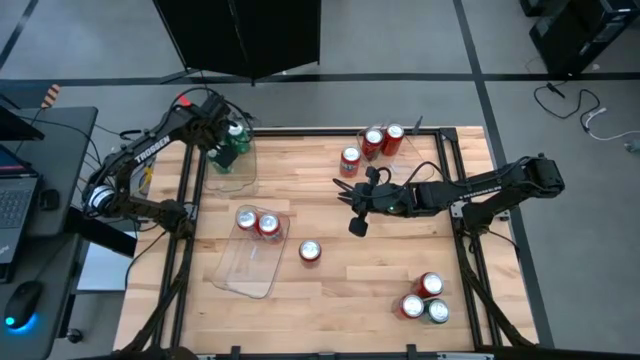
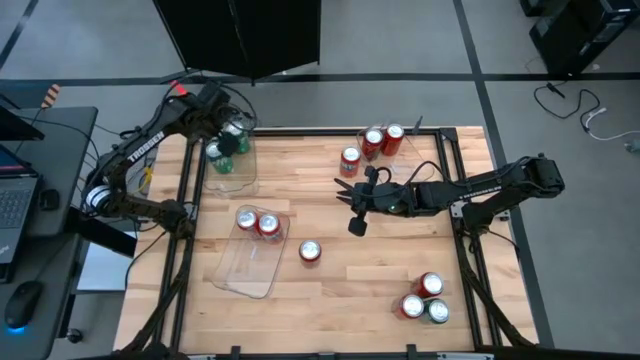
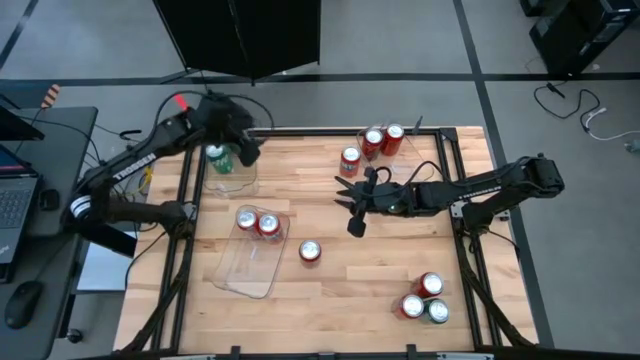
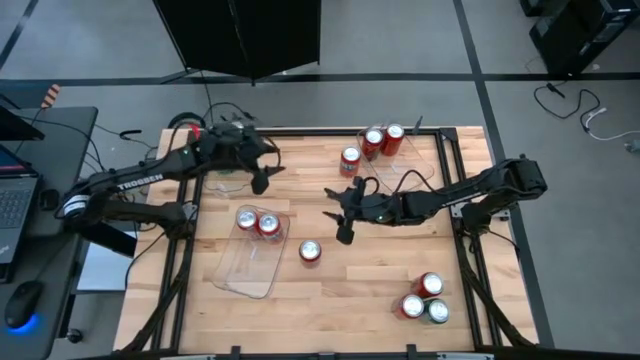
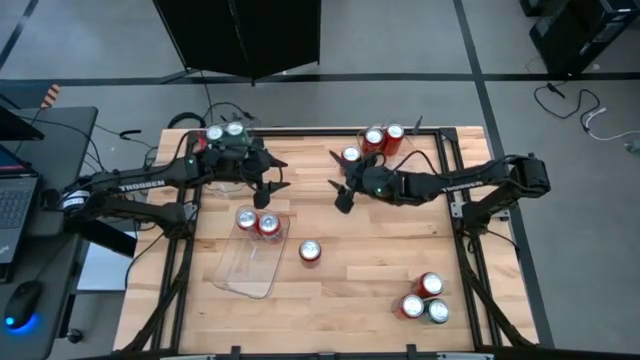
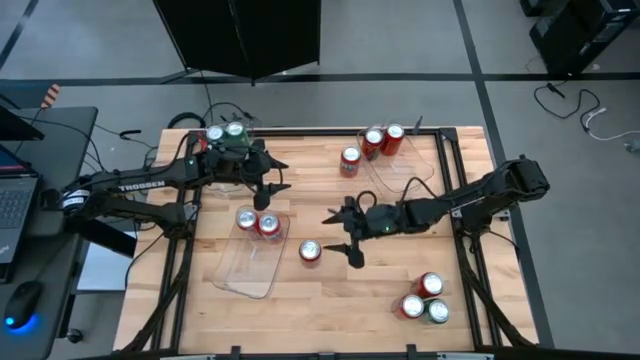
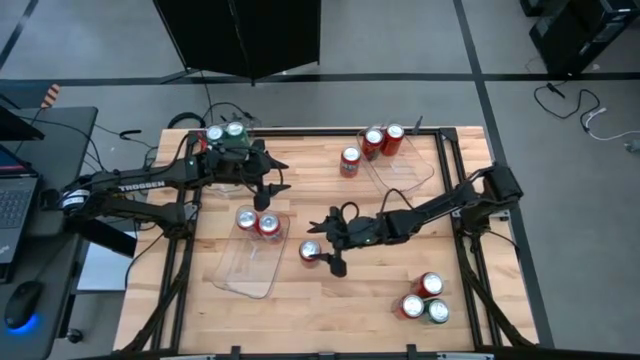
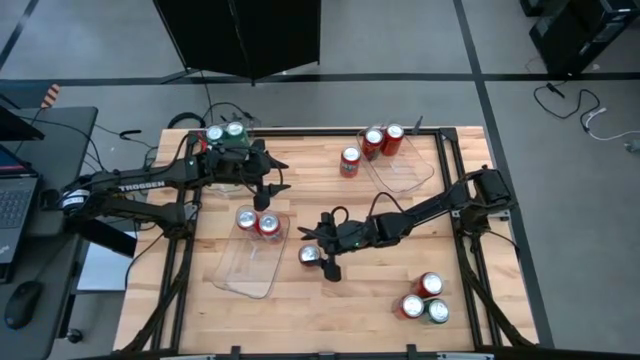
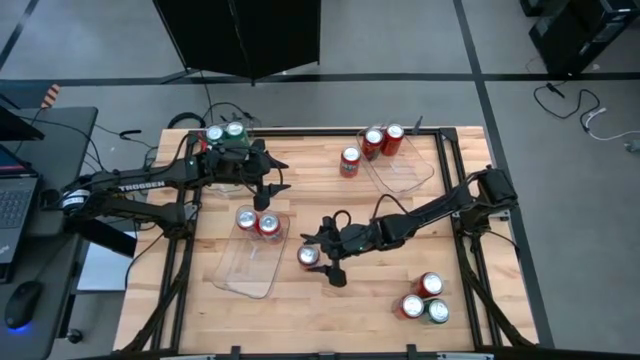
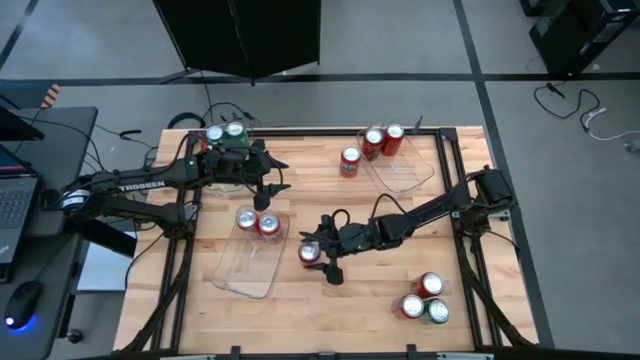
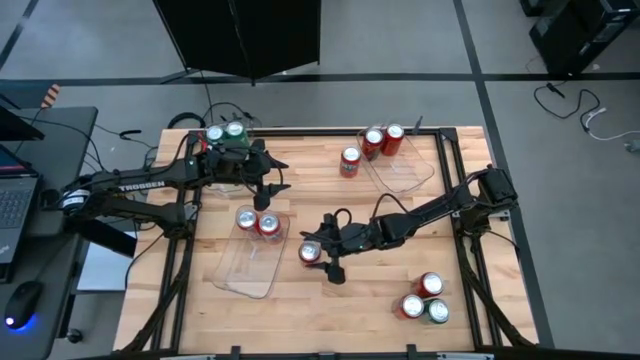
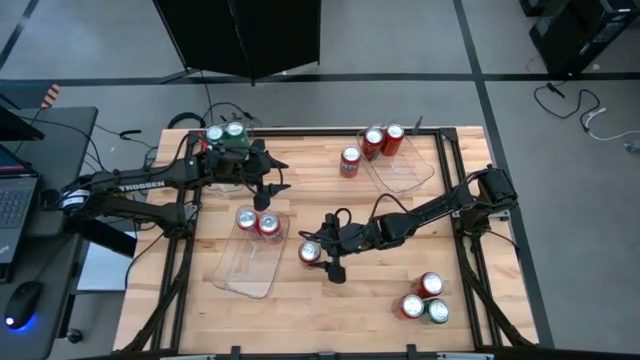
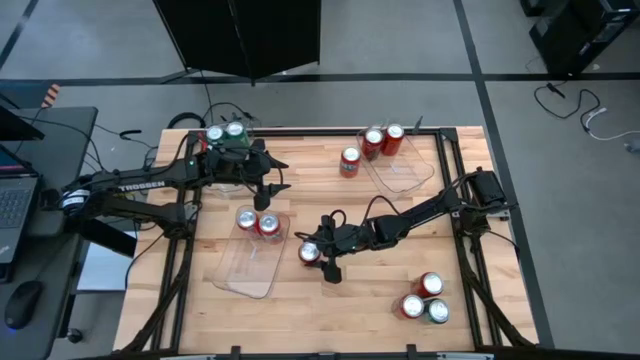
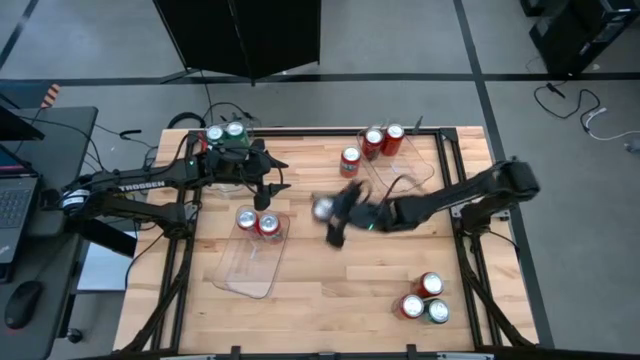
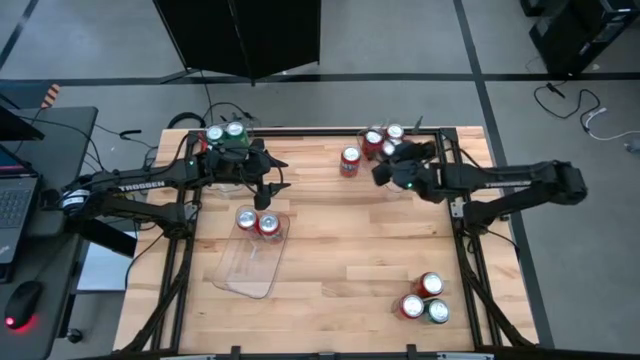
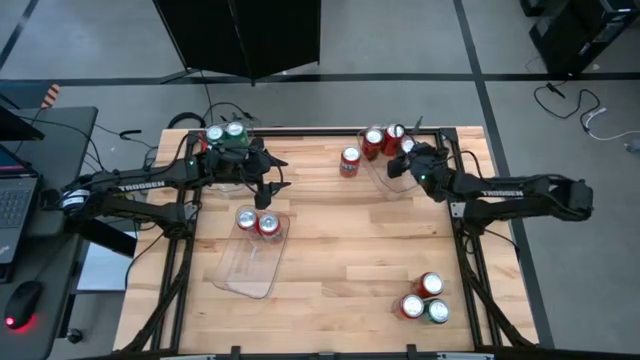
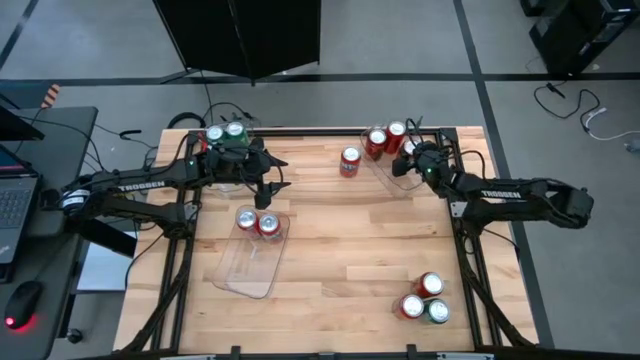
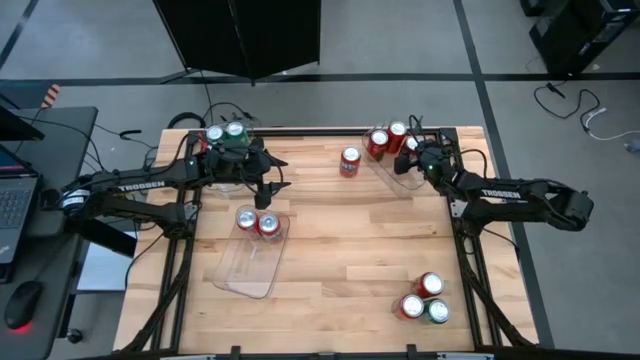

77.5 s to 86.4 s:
Task: Sort soda cans
Put the left red and black soda can into the top right transparent bin

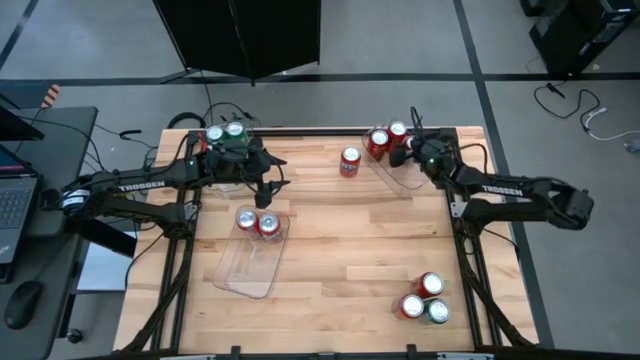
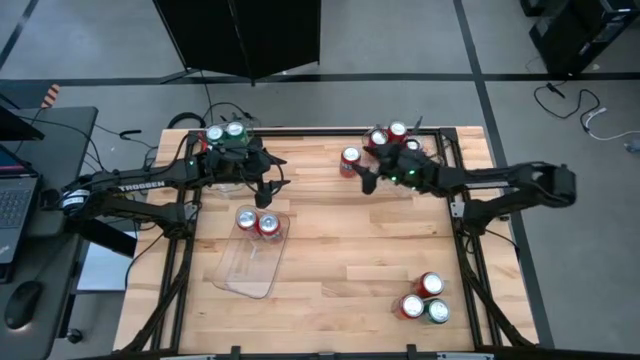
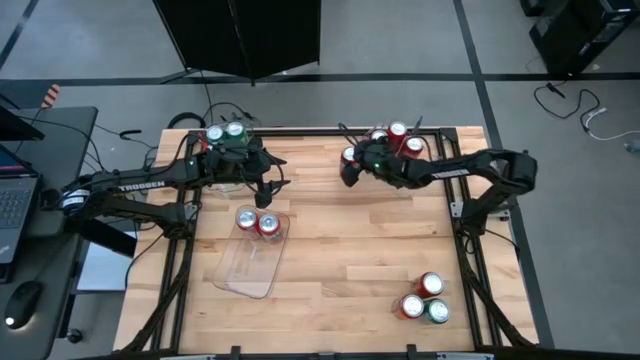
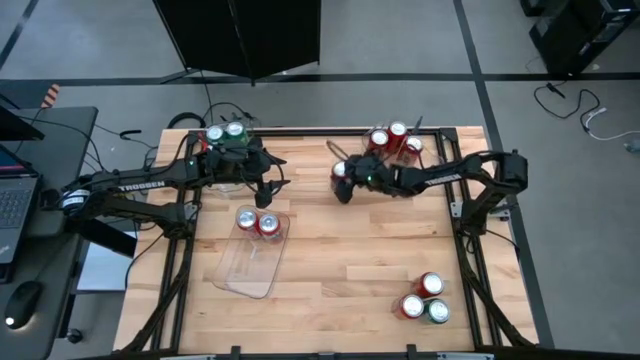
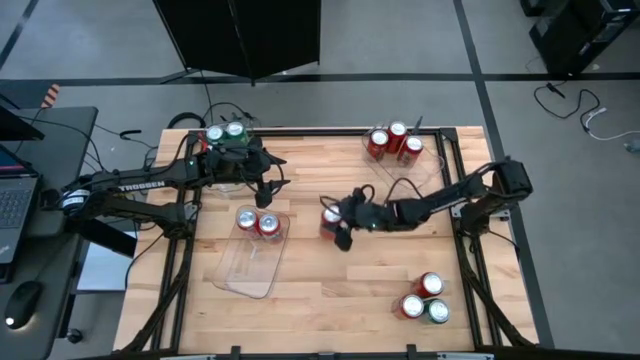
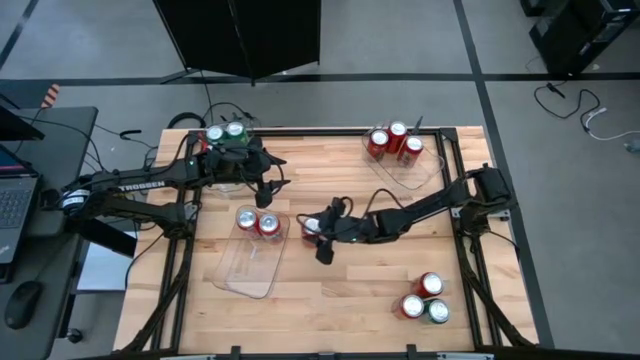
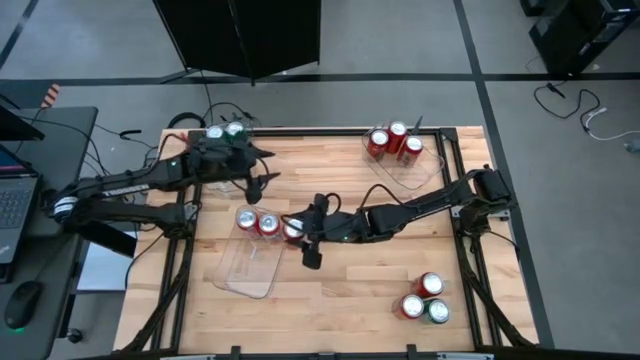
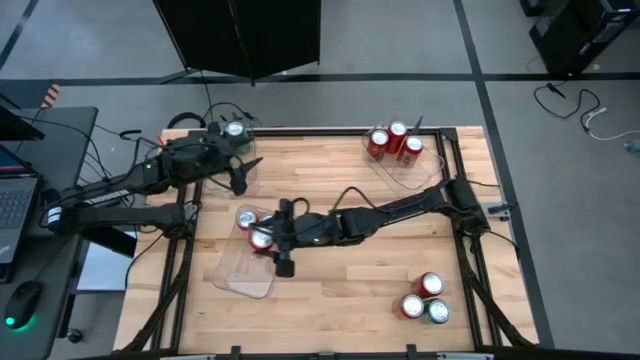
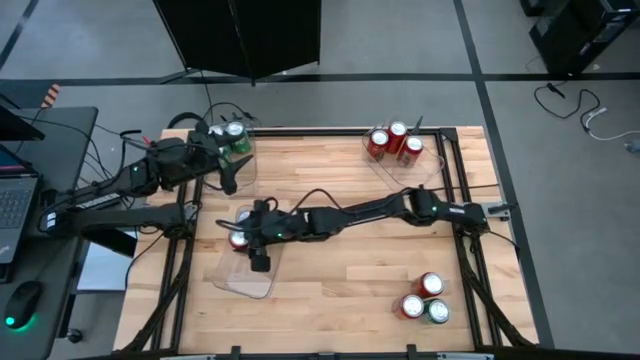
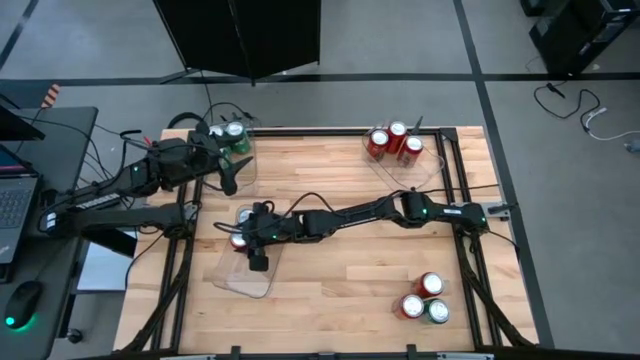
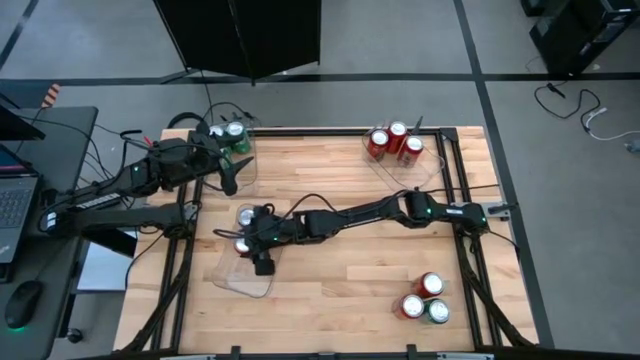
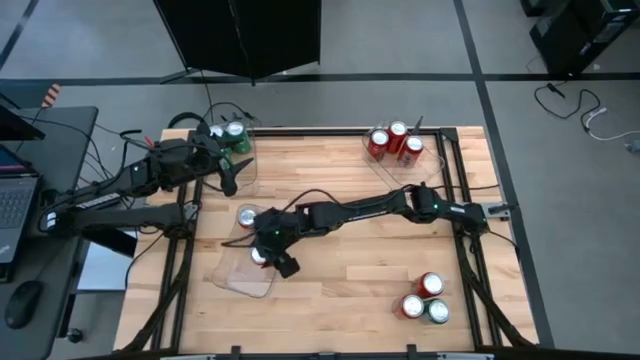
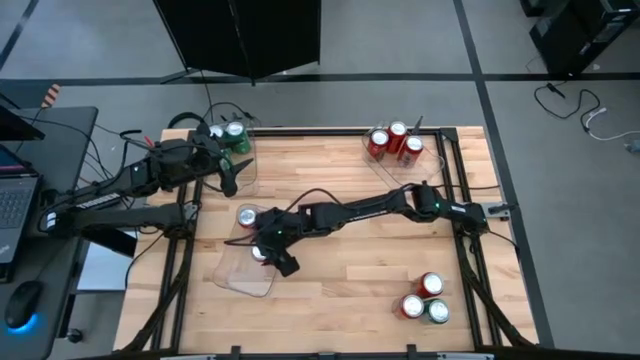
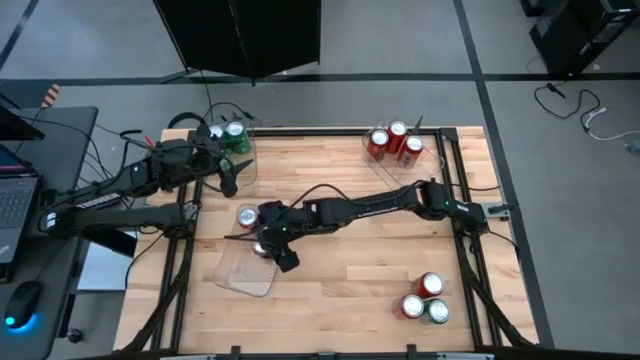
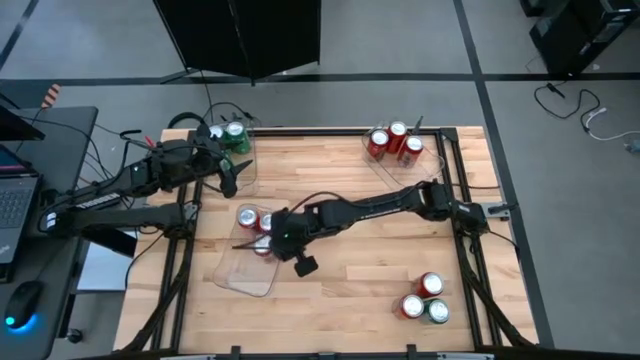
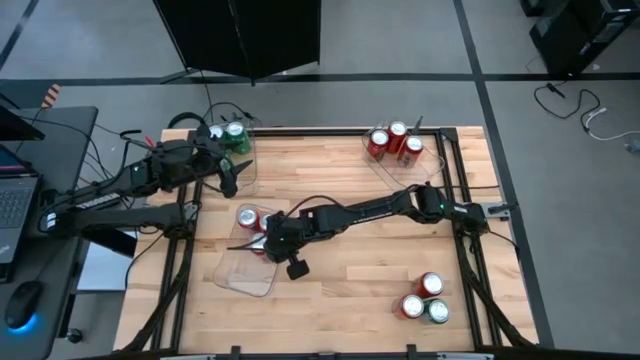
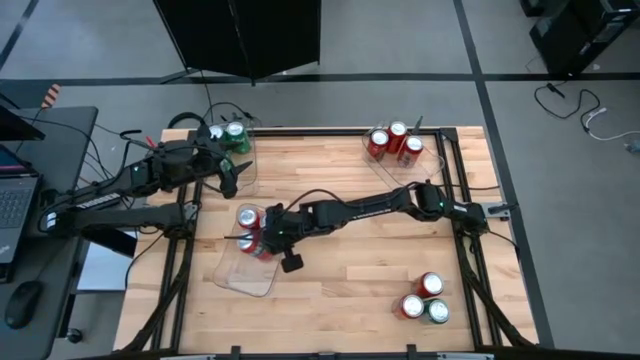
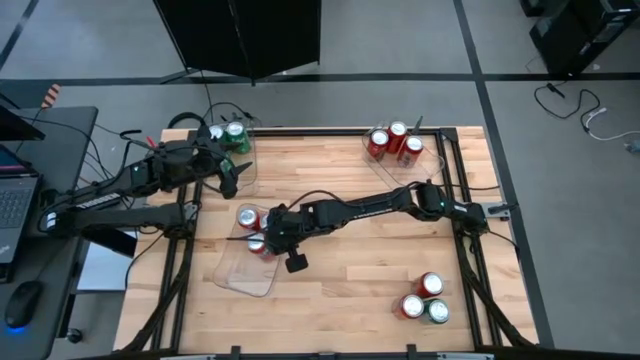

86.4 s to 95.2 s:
Put the top red soda can into the bottom left transparent bin

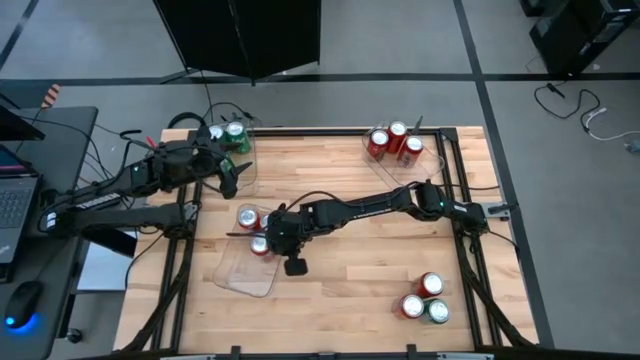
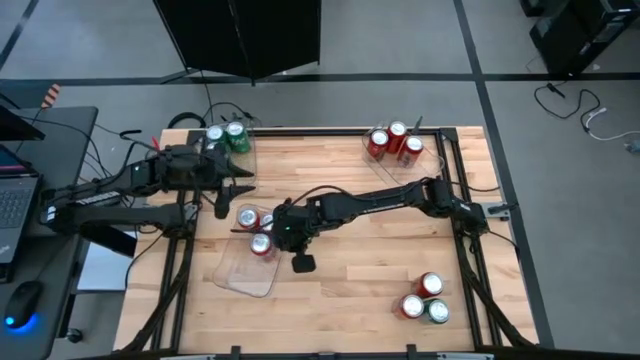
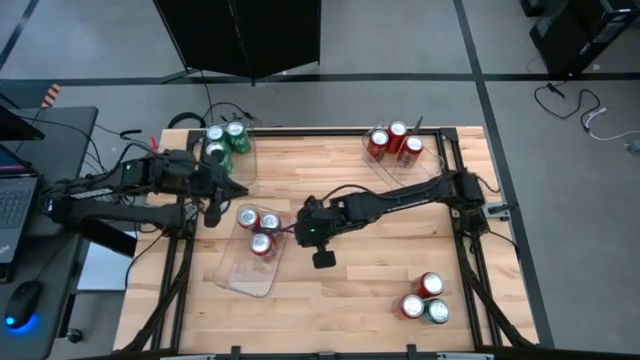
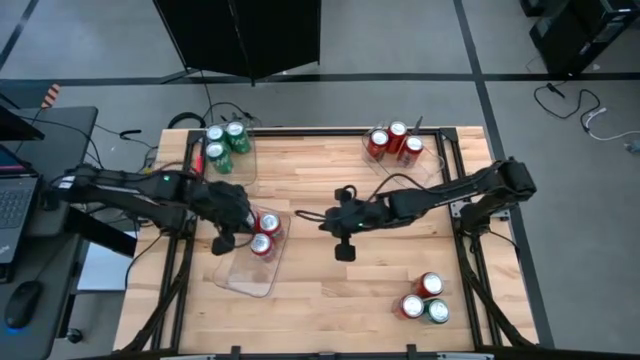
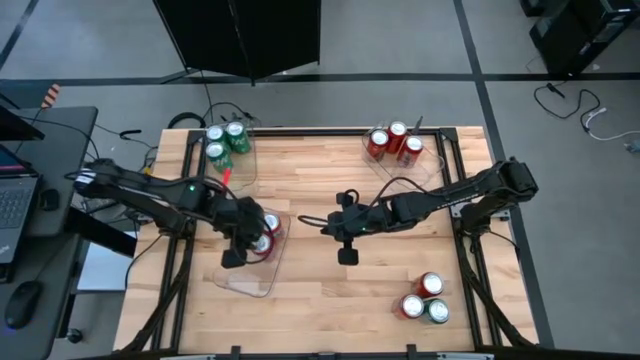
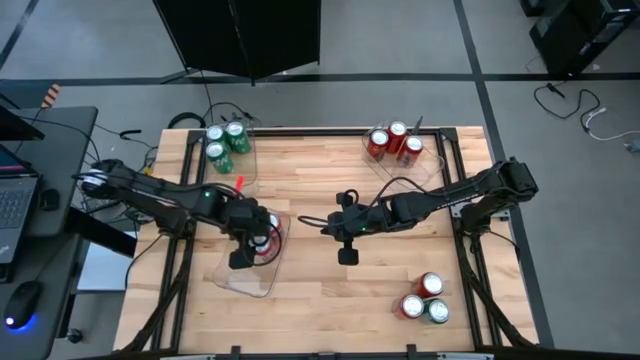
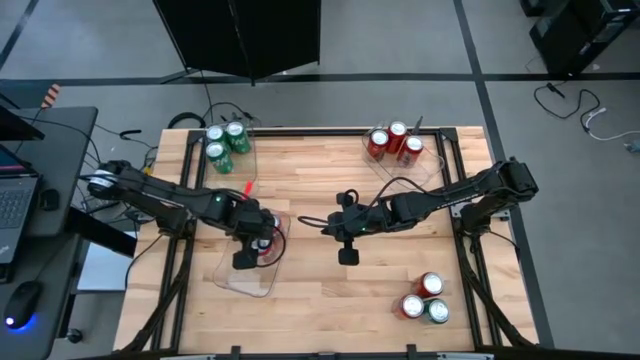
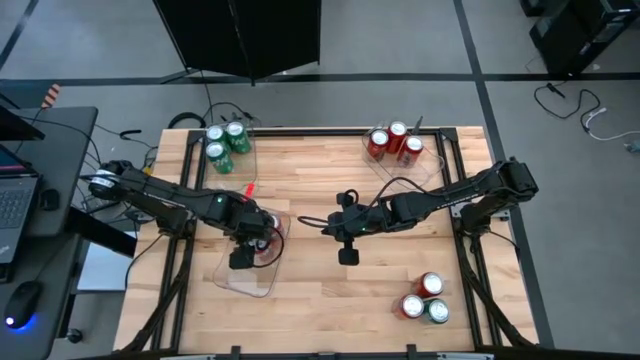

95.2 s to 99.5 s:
Adjust the red soda can in the transparent bin
